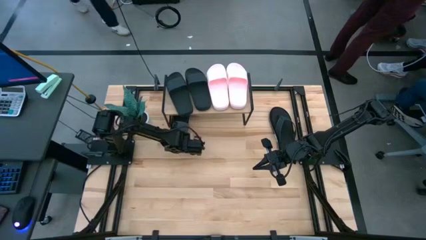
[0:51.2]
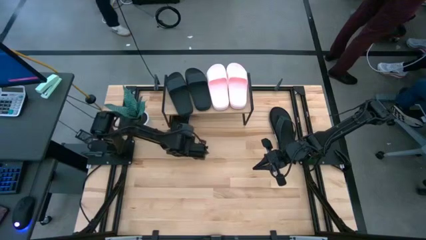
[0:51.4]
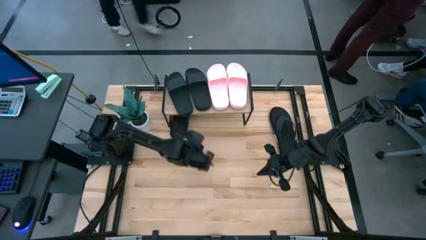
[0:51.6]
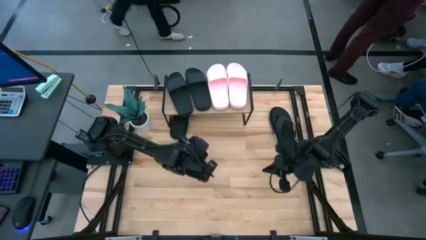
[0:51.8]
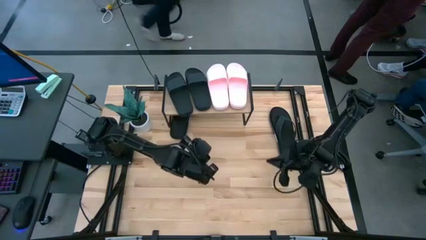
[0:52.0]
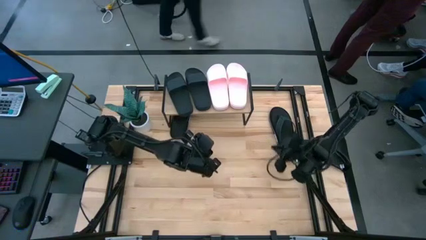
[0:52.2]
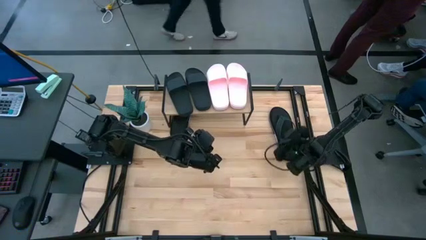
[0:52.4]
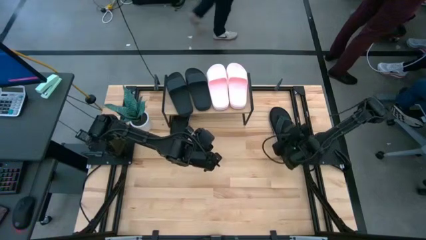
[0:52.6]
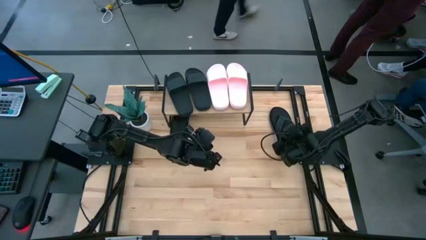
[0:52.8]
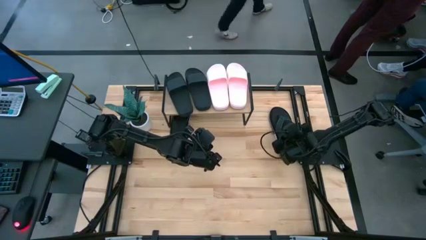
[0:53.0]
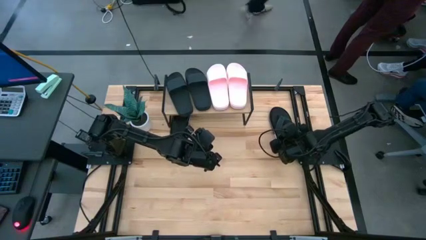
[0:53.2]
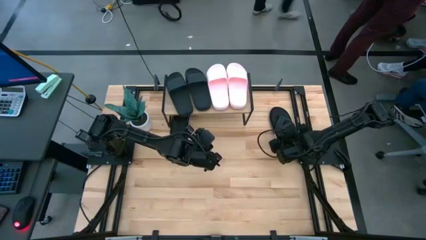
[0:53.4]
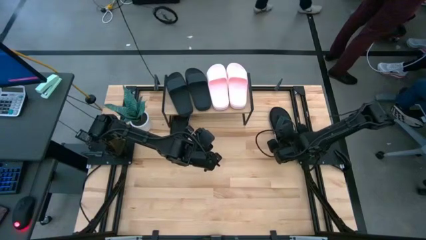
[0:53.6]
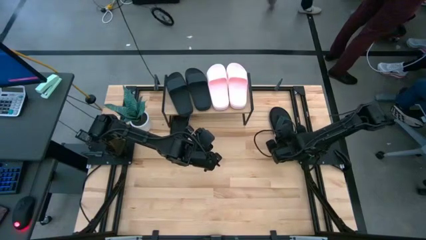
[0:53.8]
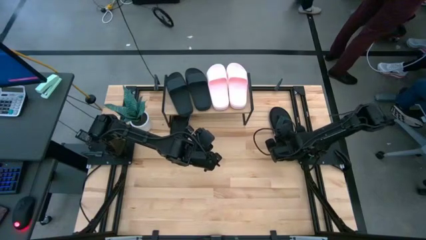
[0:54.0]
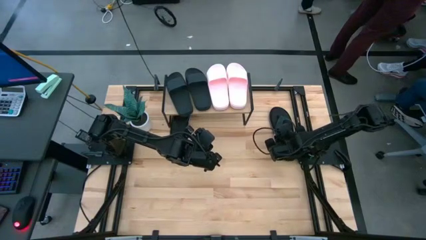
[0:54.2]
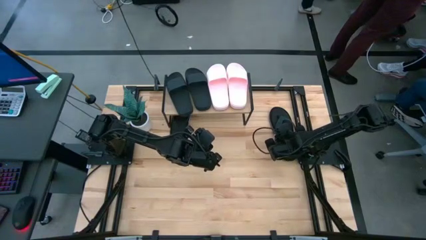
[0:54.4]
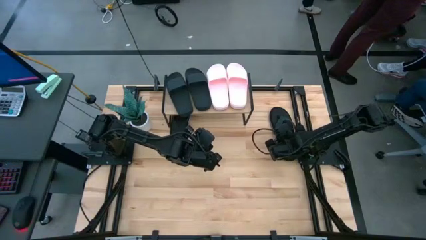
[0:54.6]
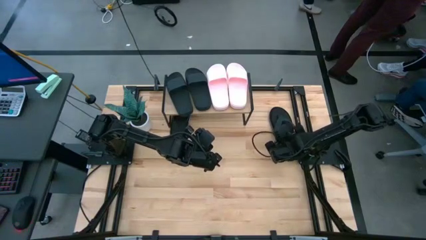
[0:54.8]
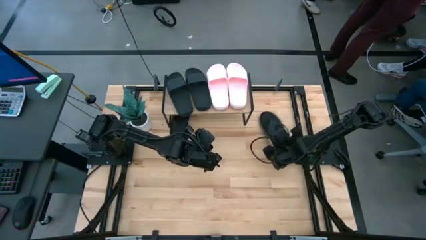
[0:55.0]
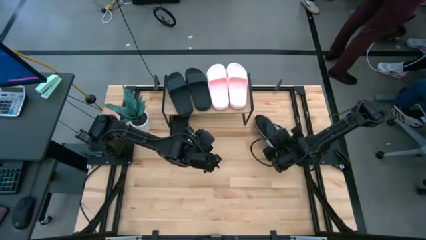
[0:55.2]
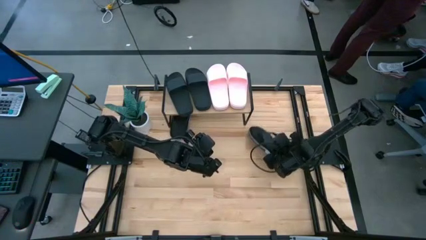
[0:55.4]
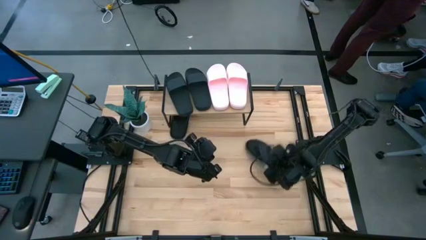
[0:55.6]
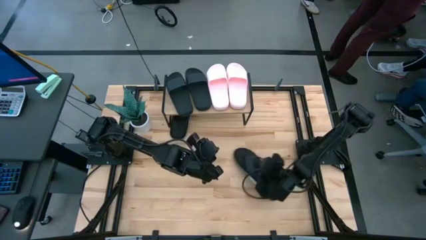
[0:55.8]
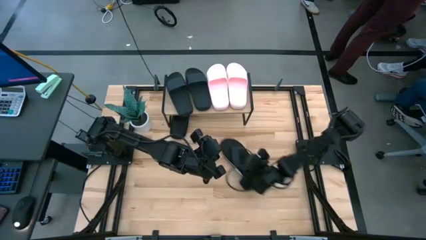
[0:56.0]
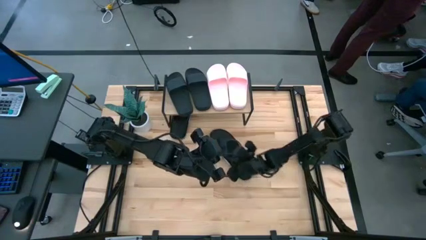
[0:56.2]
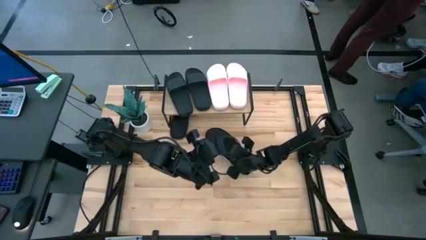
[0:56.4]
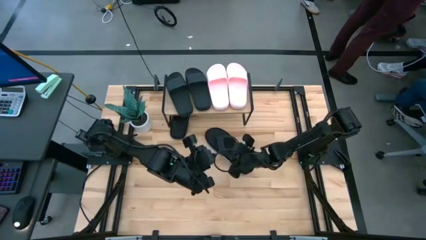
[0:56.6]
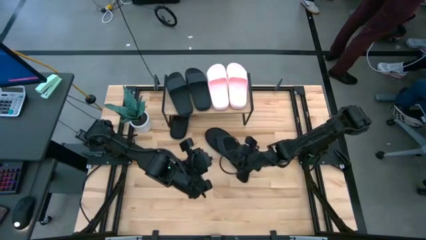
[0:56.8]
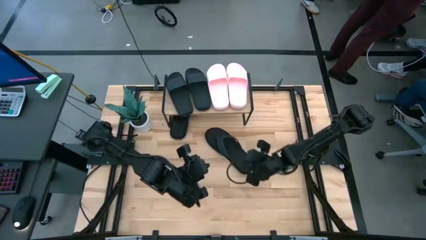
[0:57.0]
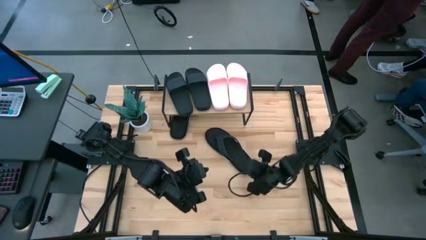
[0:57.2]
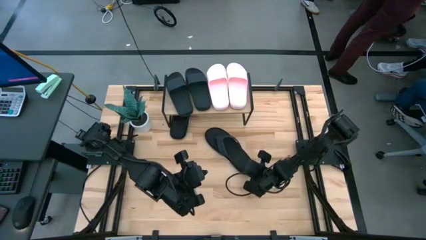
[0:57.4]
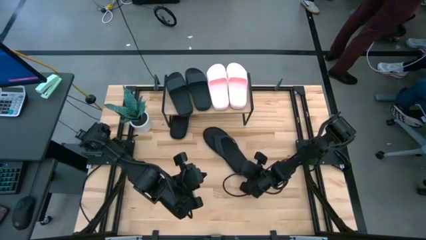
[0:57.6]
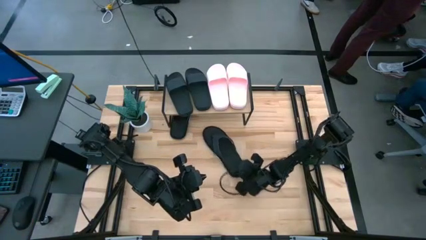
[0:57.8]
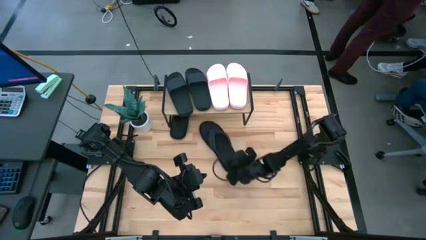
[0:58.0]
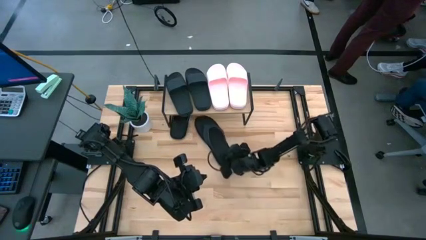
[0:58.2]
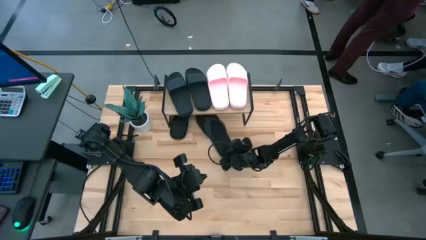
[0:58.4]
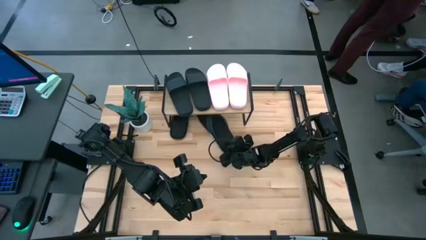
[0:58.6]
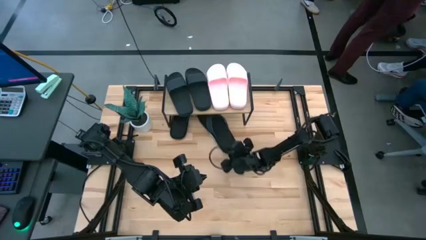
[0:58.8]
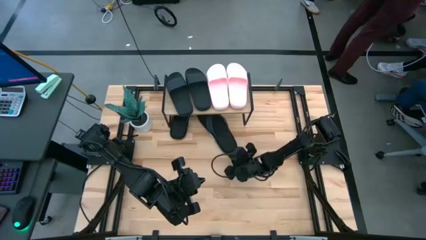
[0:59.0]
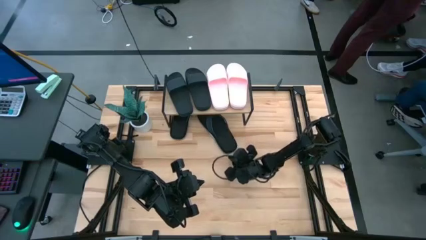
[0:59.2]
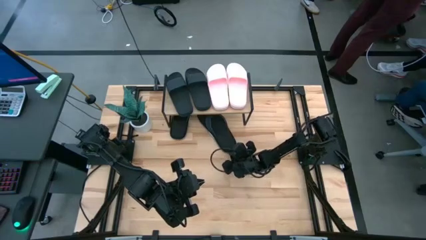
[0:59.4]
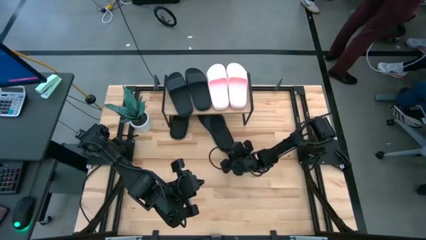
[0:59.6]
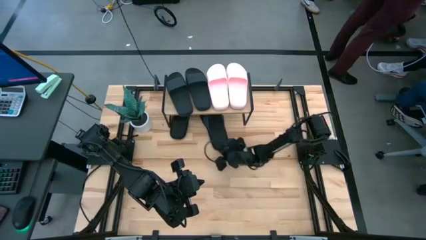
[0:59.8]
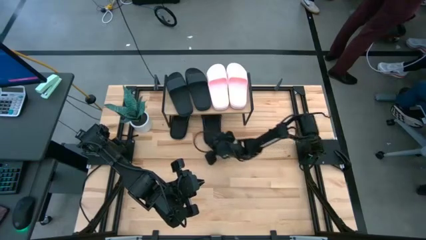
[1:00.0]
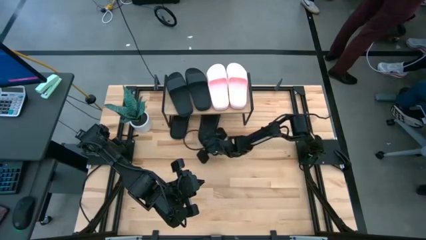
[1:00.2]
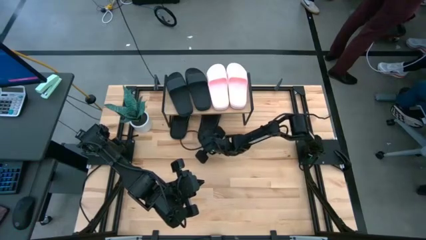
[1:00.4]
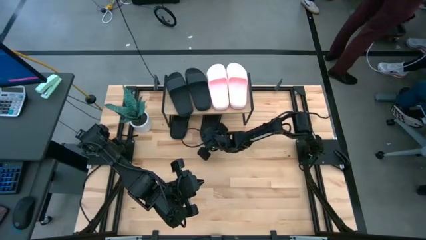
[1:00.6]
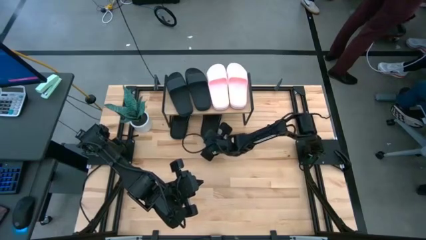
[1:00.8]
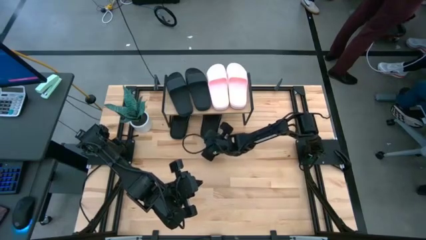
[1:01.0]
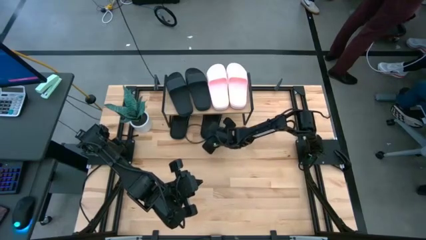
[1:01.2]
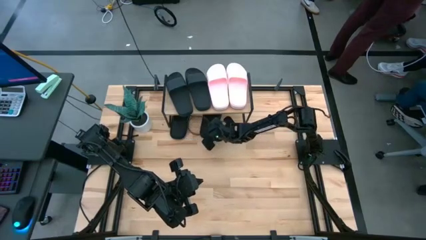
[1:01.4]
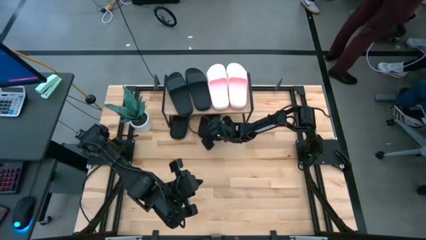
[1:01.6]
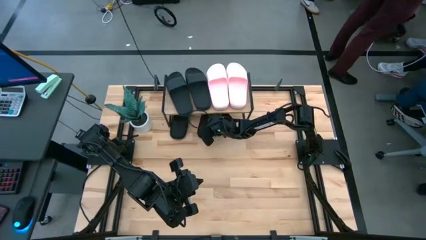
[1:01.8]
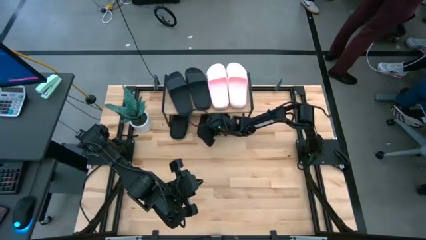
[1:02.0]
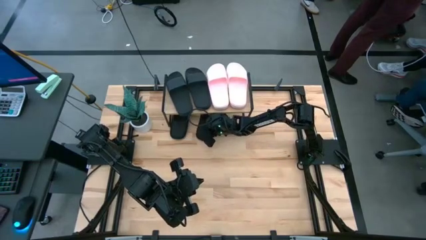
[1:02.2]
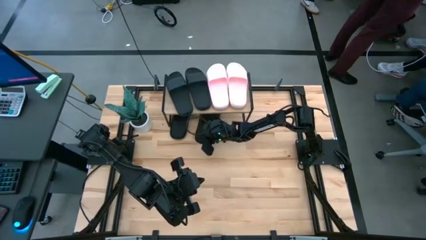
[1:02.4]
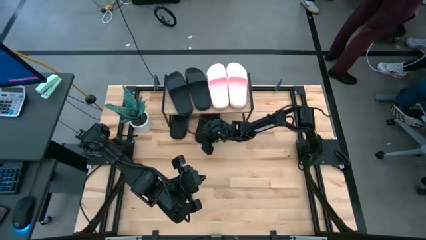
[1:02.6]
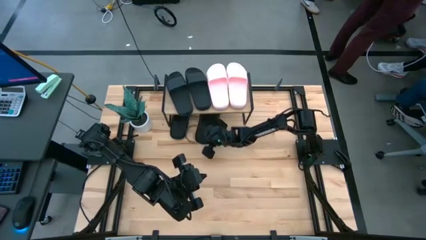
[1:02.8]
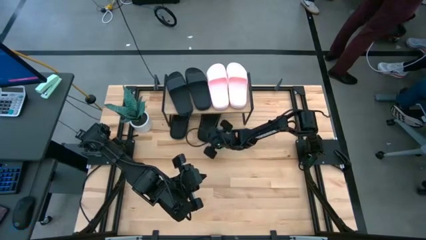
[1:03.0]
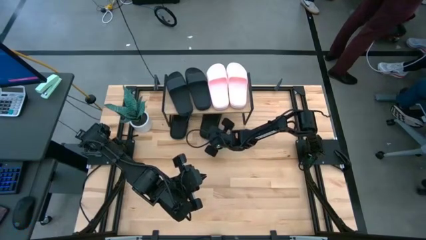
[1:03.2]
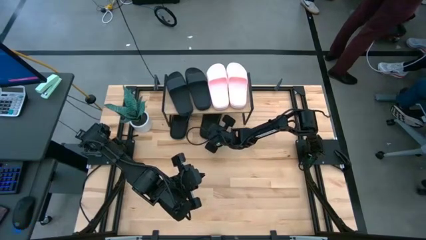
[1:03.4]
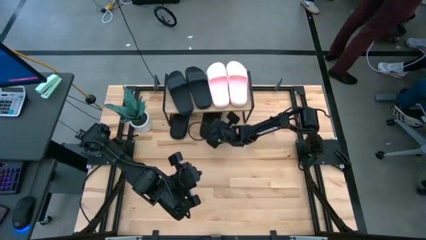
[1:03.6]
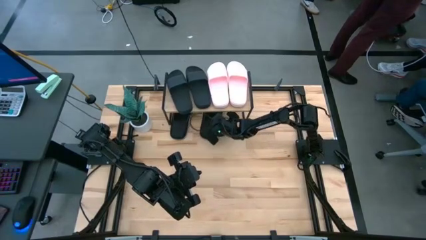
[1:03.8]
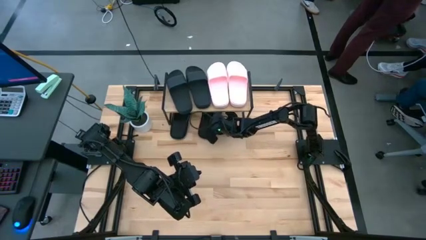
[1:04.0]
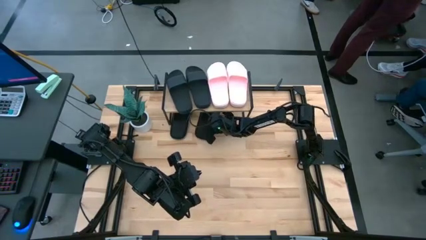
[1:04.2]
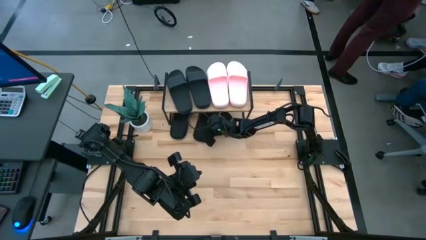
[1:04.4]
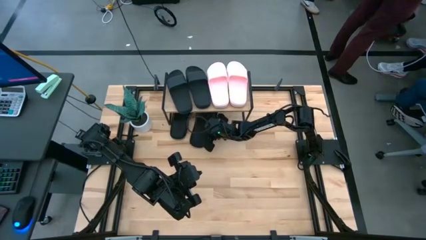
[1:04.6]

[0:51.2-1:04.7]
Task: Pick and place slides into the shelf
Put the black slipper under the shelf

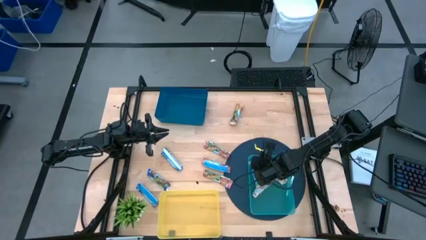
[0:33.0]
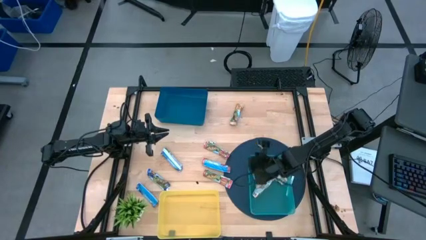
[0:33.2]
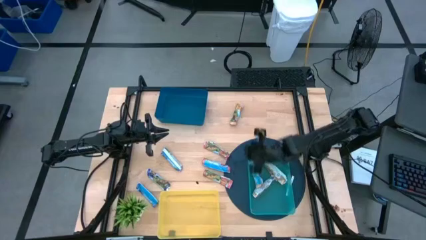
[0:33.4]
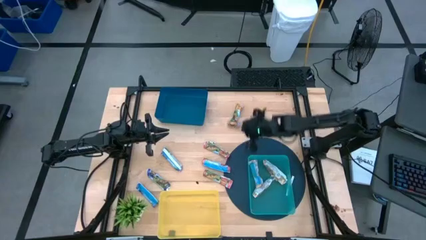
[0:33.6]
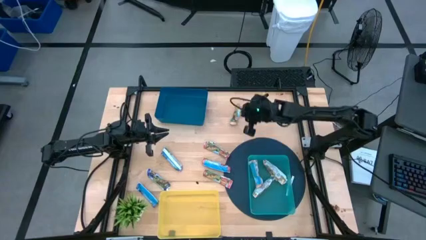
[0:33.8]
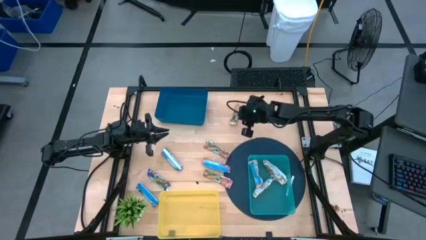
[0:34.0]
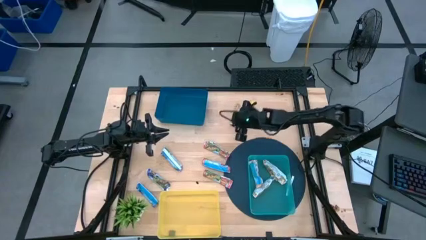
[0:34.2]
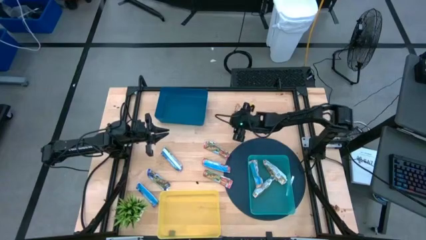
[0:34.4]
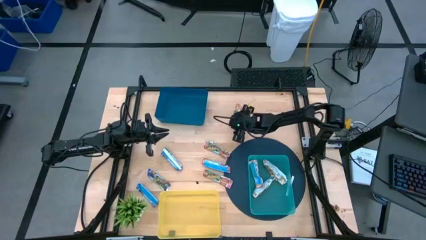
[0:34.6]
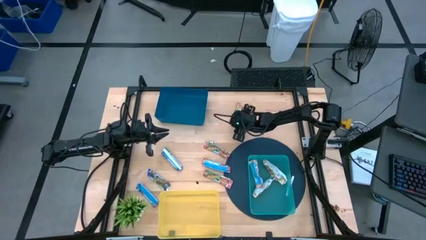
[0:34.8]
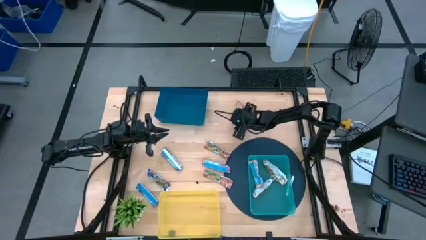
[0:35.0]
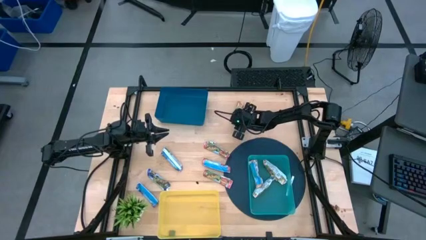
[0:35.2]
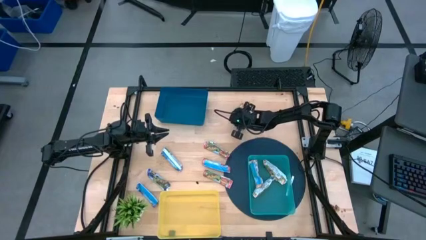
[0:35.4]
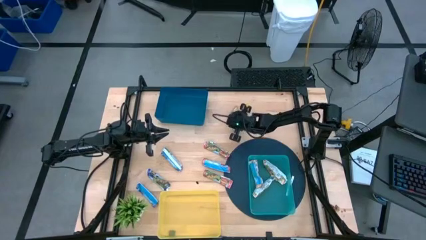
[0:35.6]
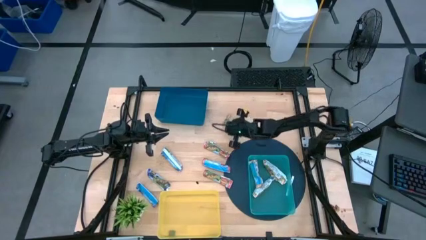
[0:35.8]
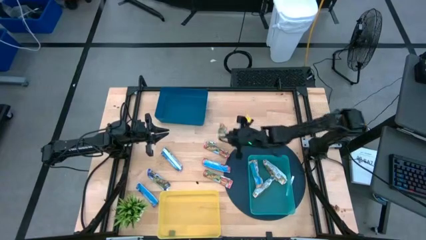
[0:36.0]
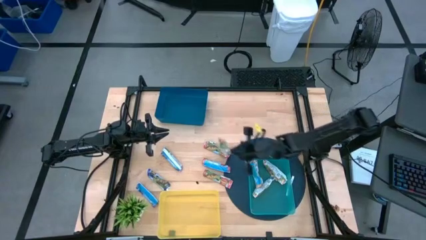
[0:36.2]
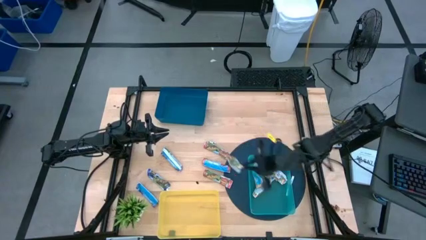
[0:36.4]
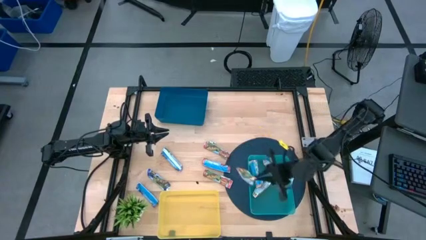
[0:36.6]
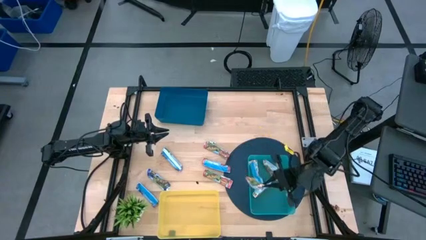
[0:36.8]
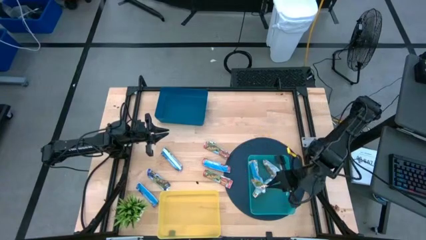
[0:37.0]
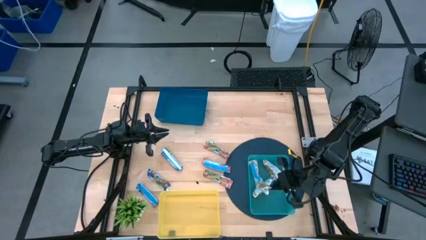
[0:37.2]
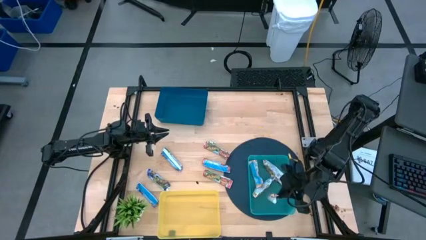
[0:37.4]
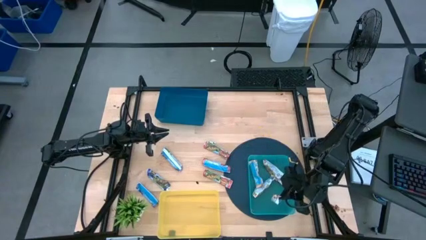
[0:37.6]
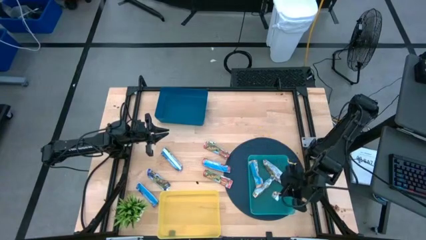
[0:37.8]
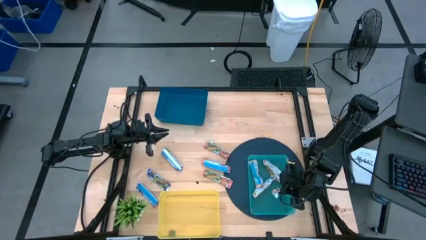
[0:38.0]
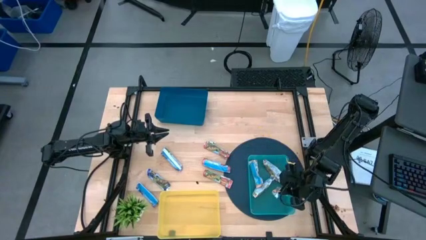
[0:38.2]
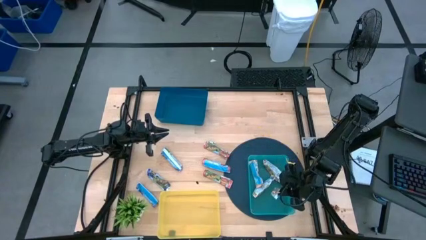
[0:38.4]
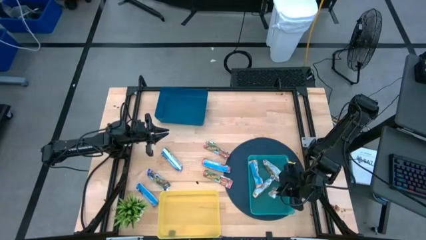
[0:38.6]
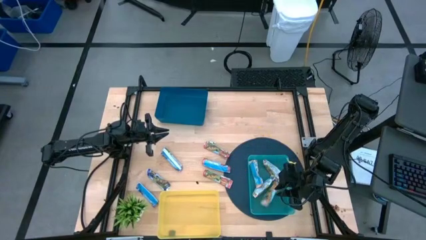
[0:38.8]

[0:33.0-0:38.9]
Task: Pick and place Granola Bars by type
Put the yellow granola bar into the green bin
